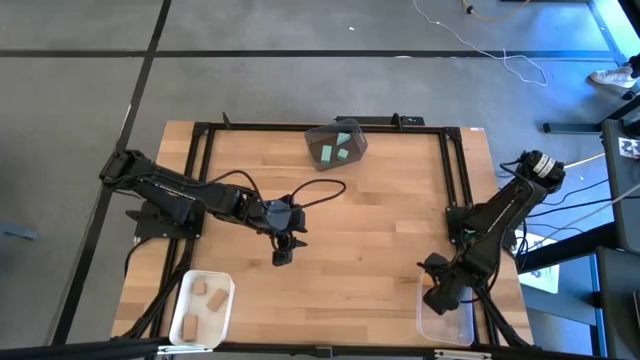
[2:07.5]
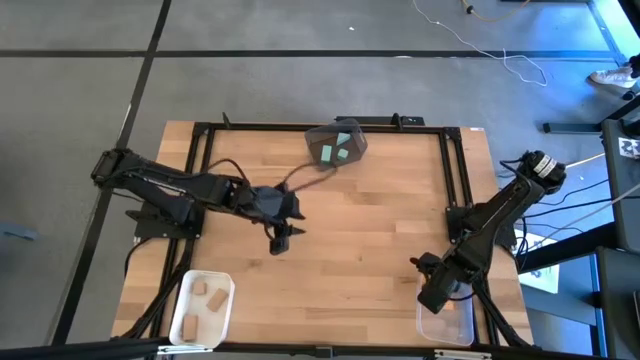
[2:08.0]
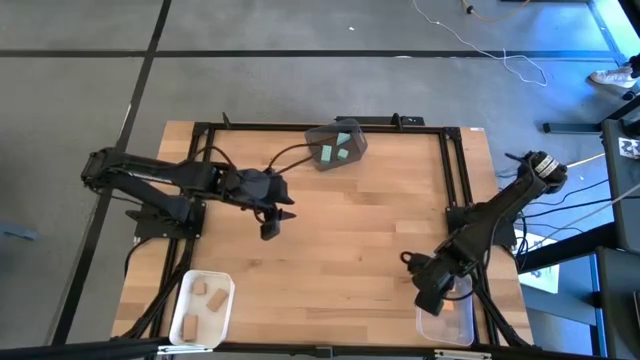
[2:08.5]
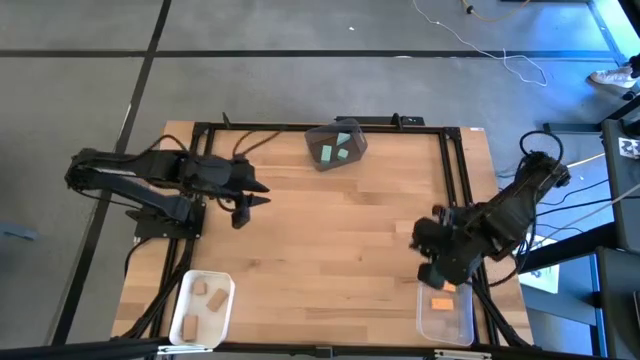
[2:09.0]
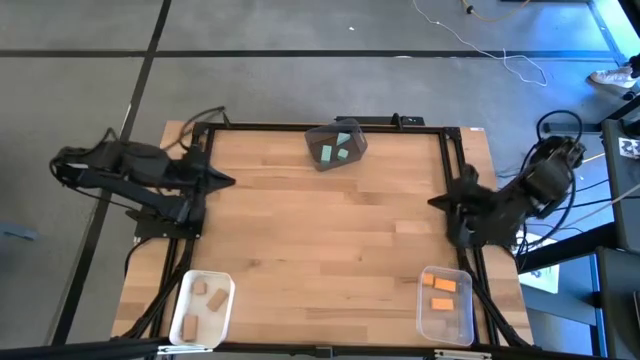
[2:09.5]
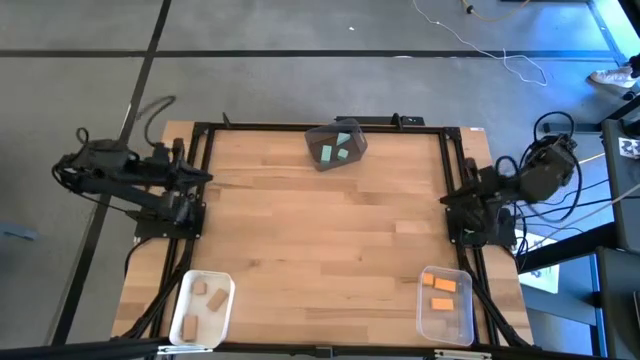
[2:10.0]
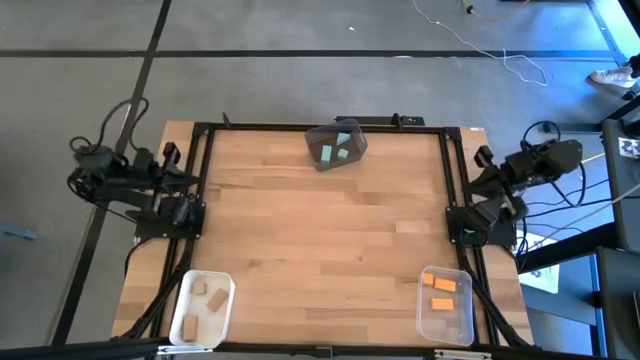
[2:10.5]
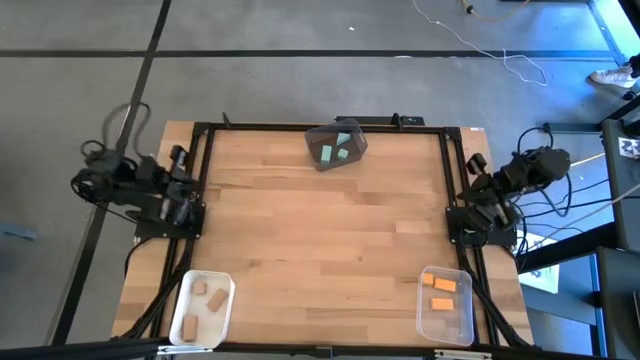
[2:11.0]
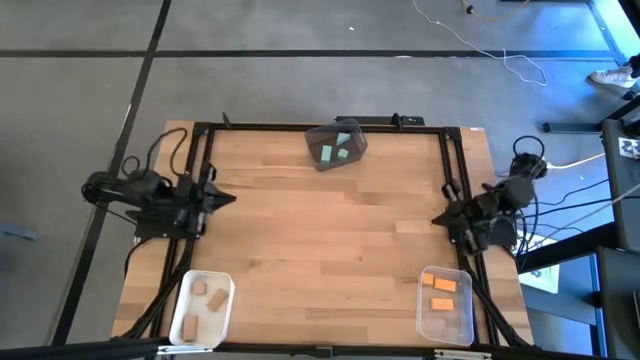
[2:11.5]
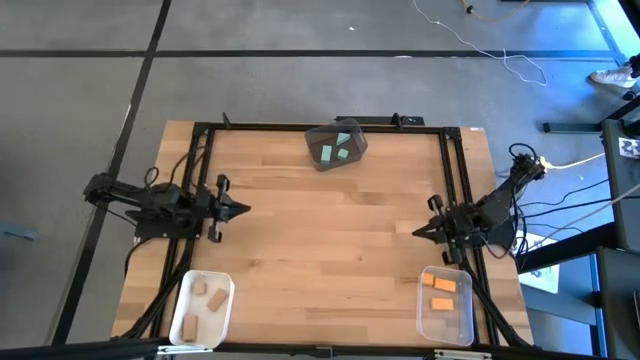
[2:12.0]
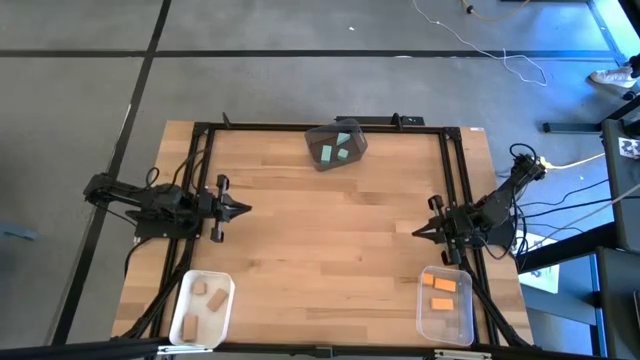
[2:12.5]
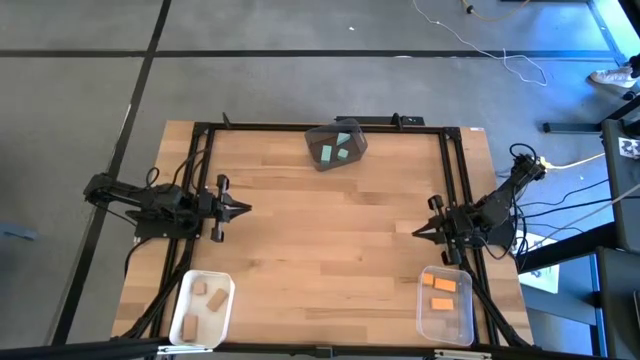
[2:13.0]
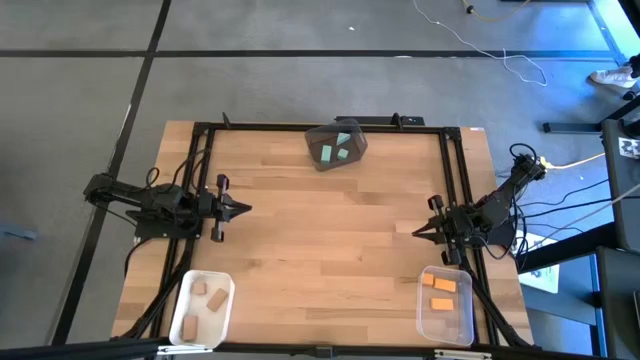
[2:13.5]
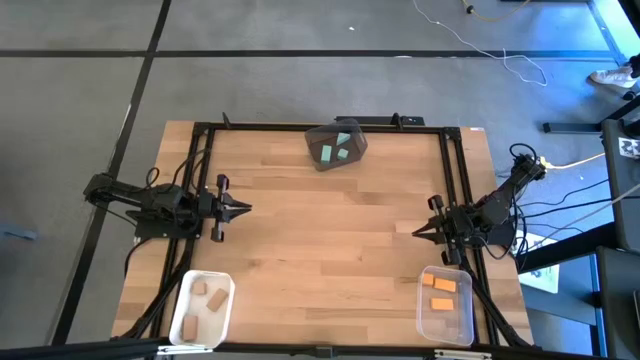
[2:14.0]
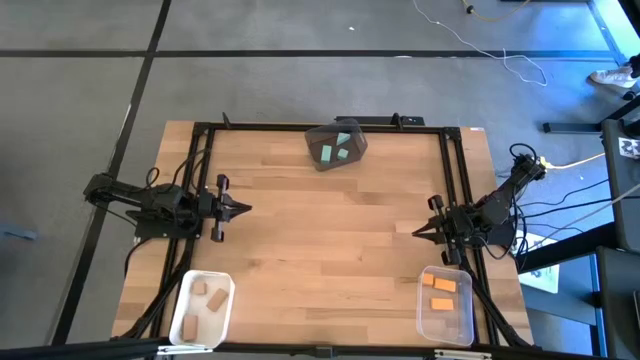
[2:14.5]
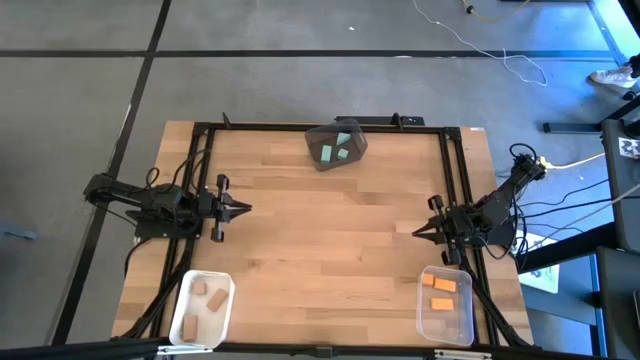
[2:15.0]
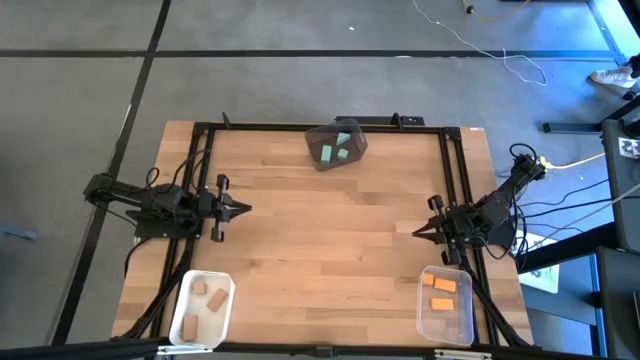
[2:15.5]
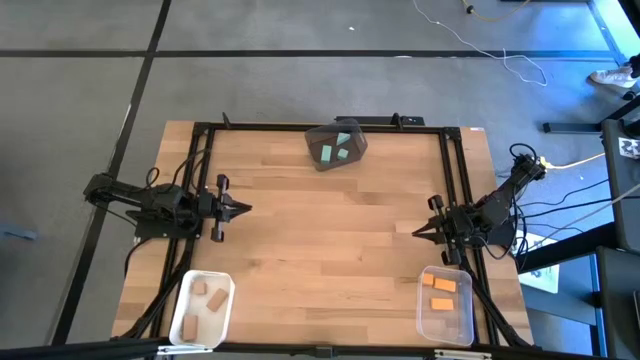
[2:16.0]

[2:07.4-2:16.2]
Task: Sort & place blocks by color
Return to Home Position

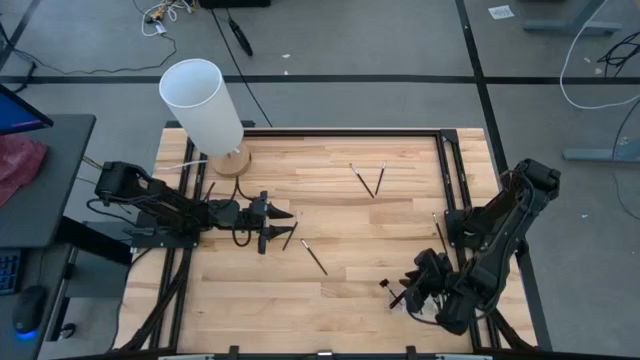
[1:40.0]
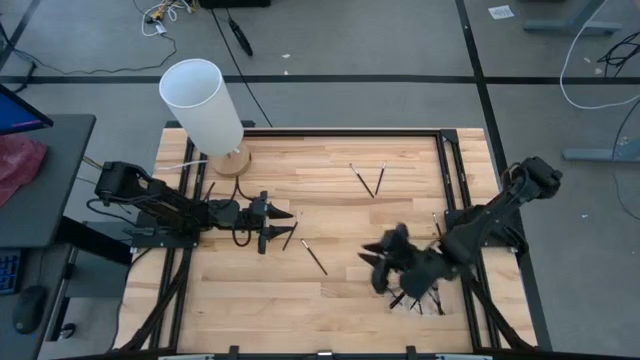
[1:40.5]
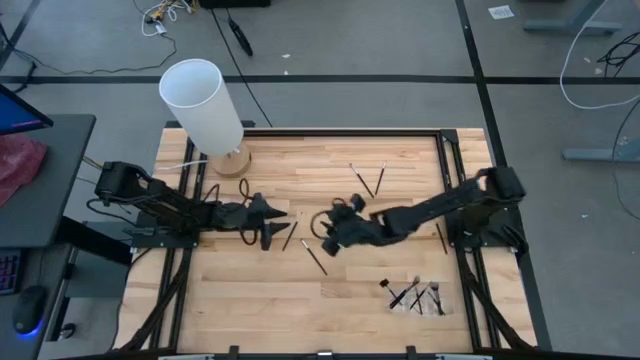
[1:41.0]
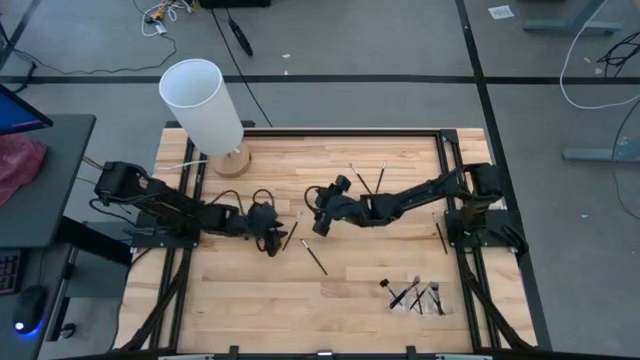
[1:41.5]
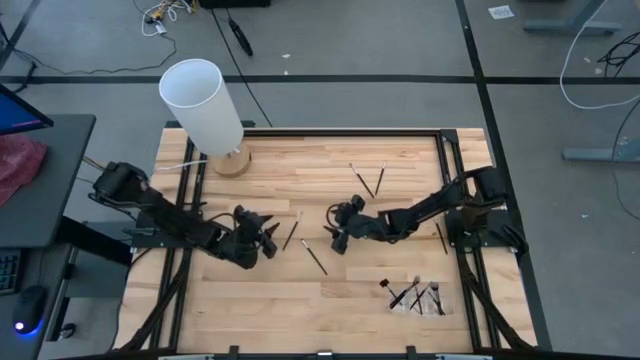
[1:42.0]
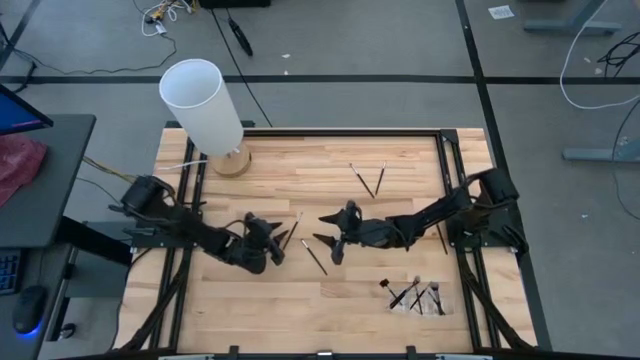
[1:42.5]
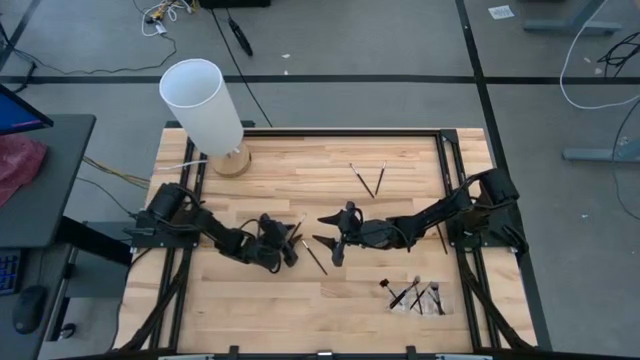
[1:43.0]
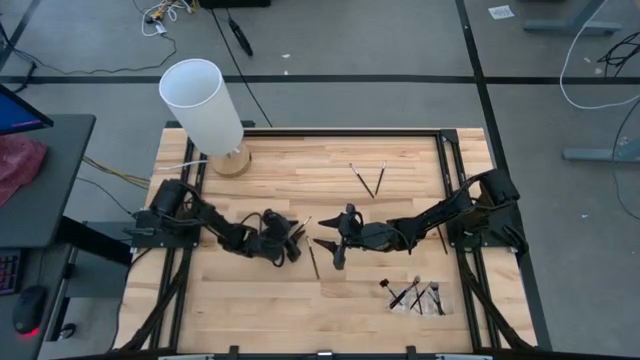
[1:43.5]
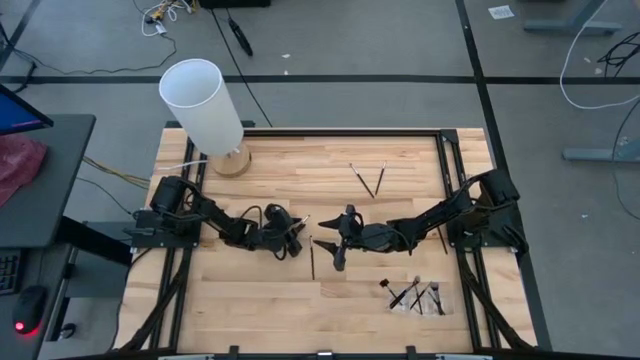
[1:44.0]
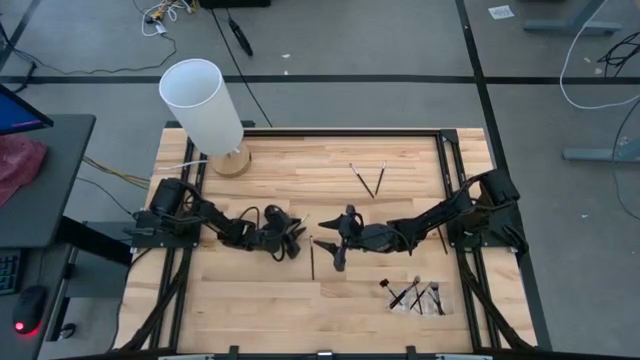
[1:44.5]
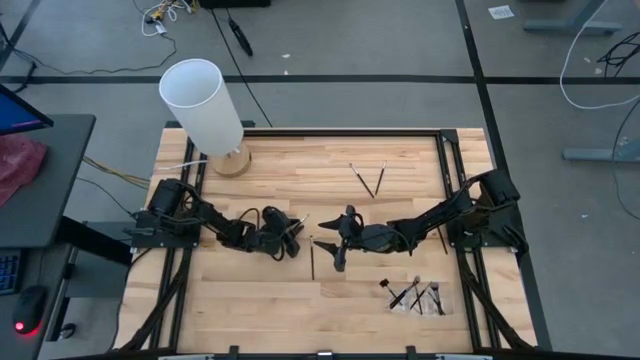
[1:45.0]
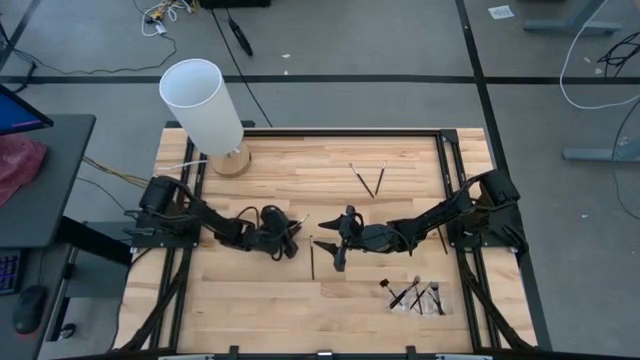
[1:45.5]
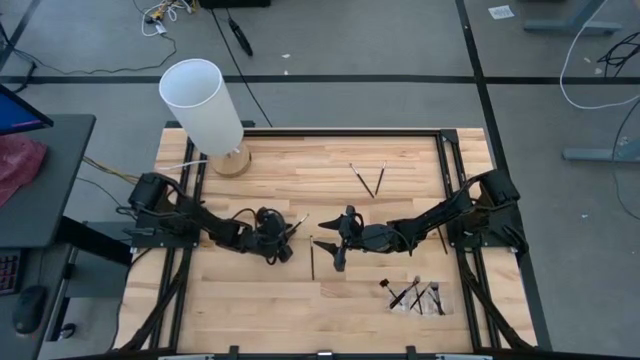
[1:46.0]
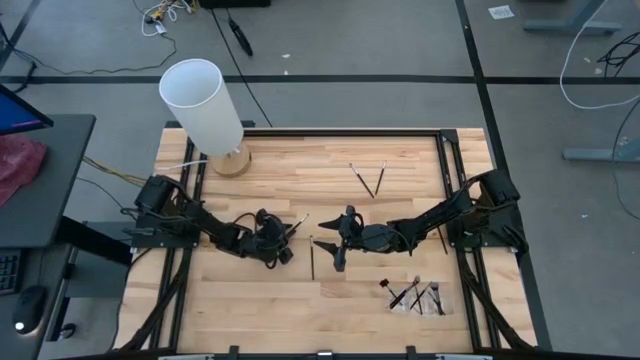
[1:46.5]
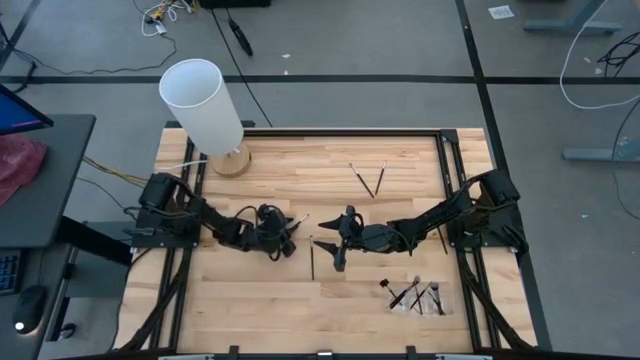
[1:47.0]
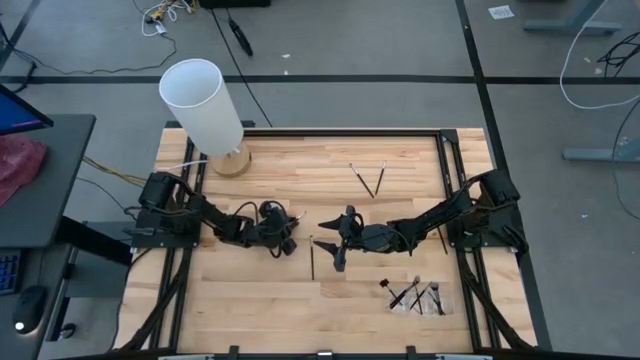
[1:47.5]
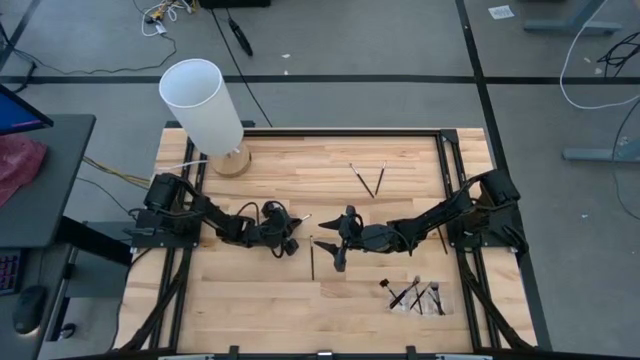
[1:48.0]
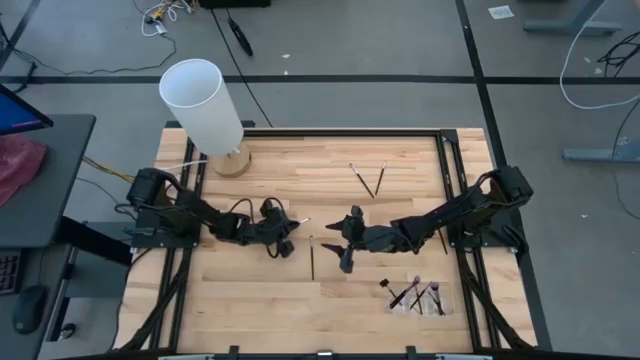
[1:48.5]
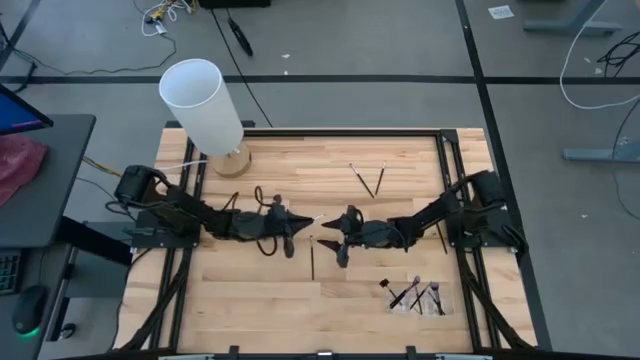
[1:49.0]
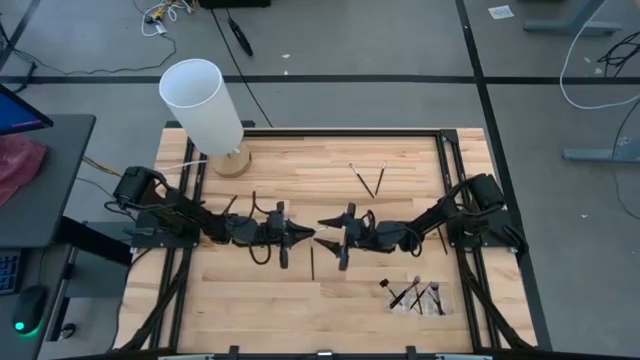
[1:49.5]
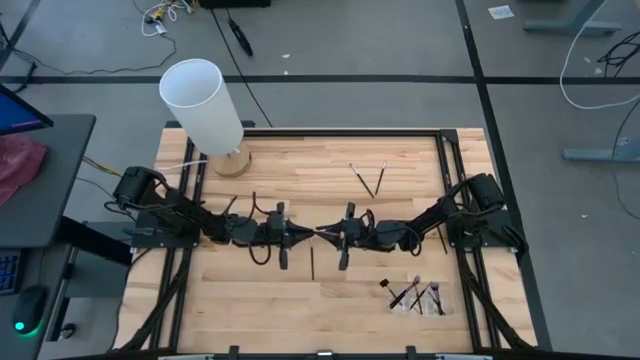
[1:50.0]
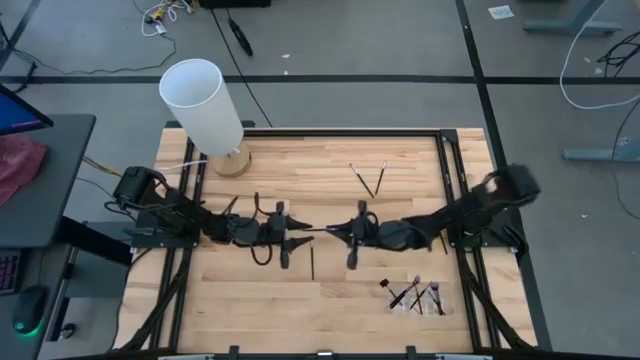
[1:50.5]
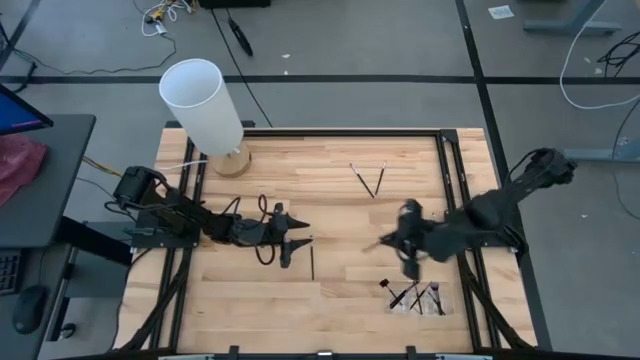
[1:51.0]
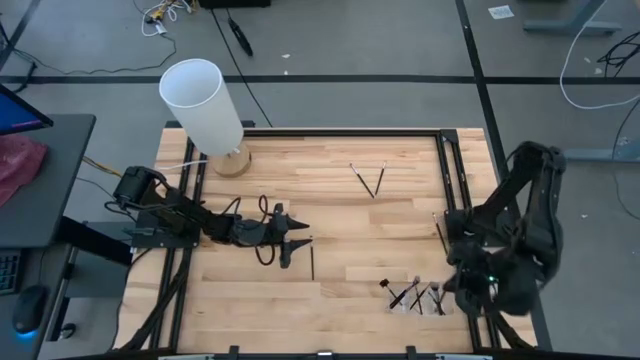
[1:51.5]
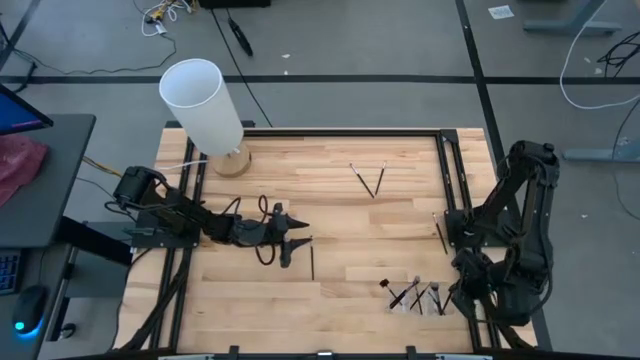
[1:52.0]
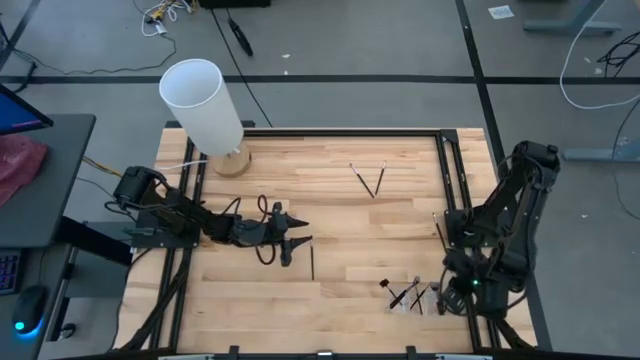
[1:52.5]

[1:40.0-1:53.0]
Task: Pick & Place Makeup Supplies
Put the silver makeup brush into the transparent organizer
